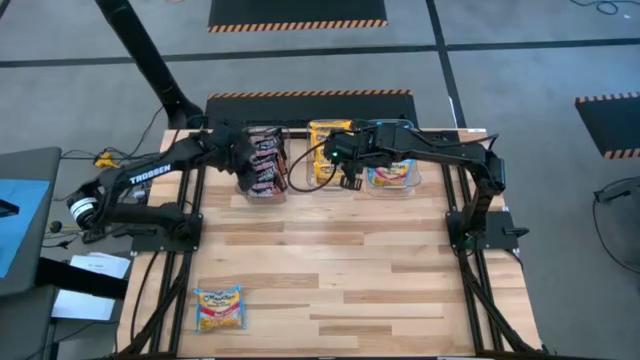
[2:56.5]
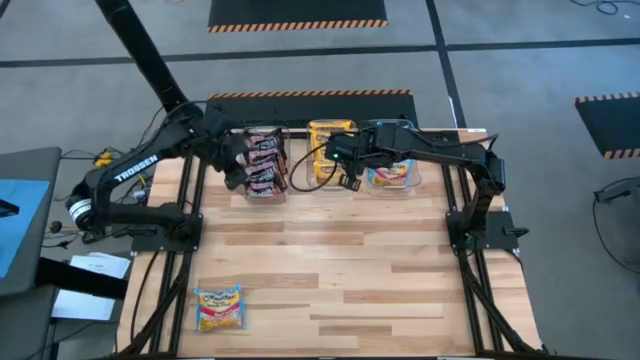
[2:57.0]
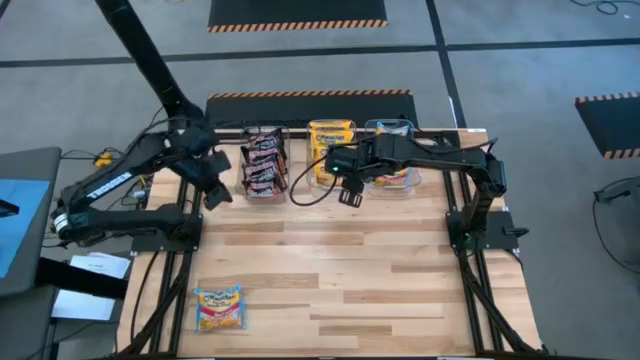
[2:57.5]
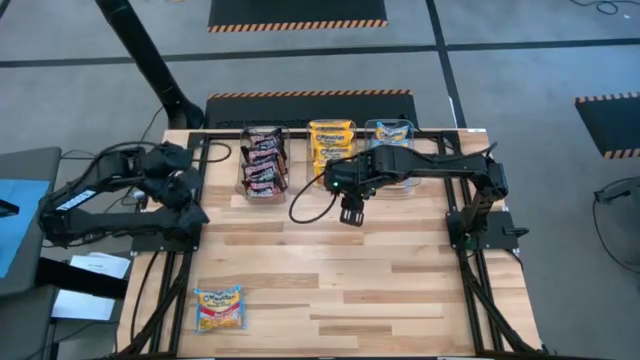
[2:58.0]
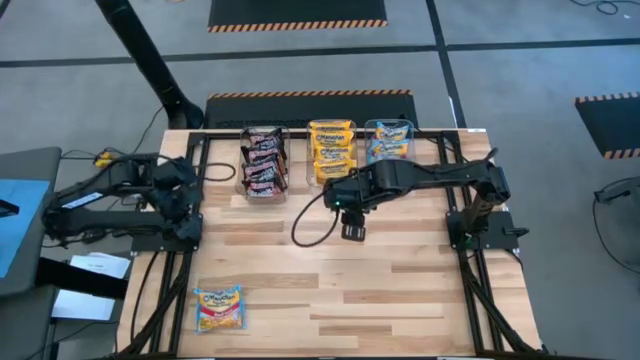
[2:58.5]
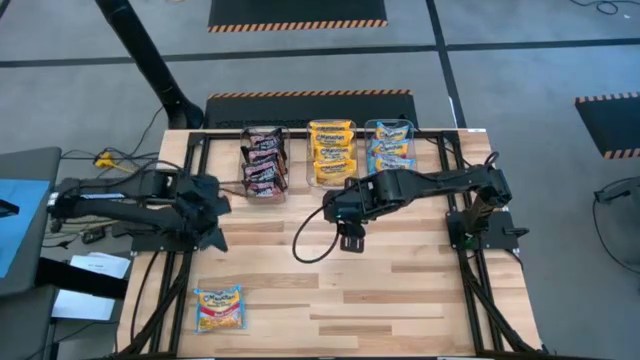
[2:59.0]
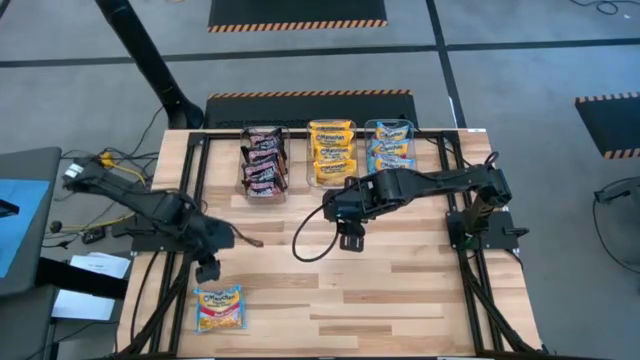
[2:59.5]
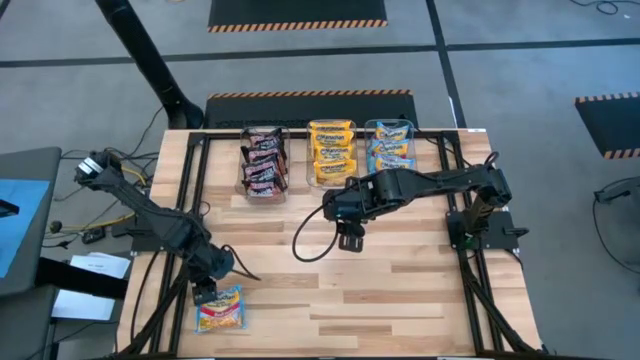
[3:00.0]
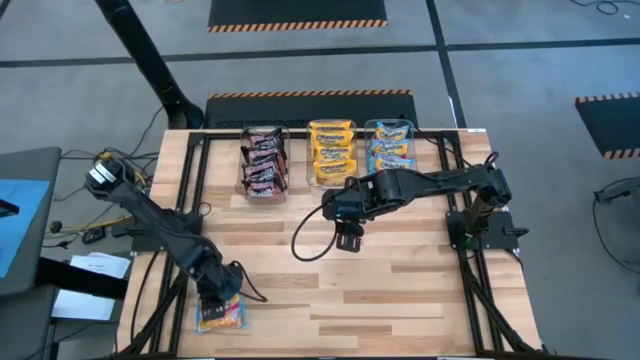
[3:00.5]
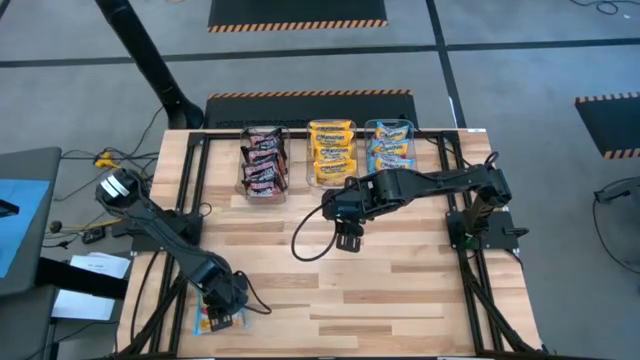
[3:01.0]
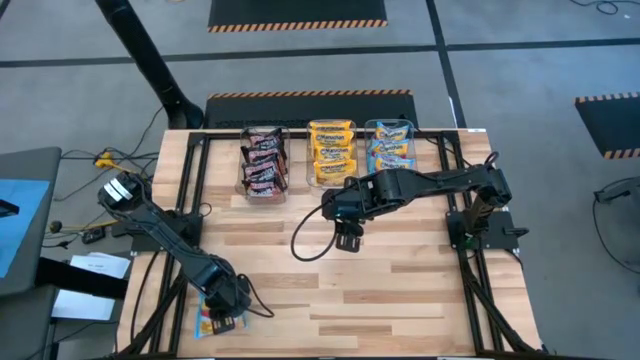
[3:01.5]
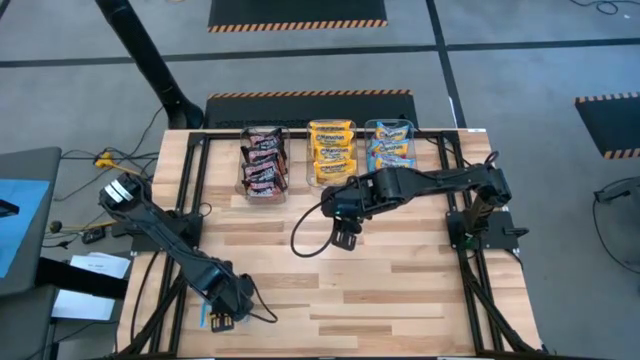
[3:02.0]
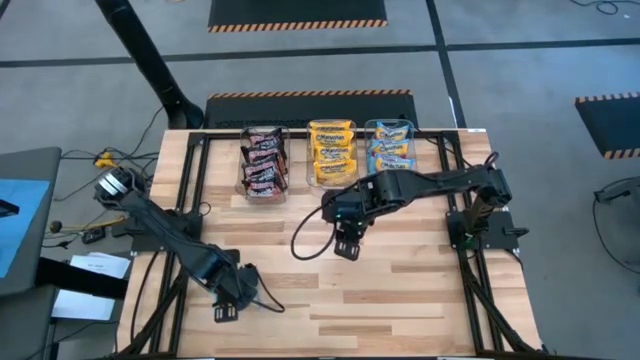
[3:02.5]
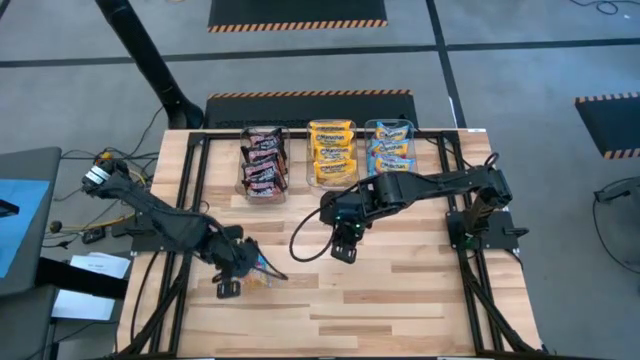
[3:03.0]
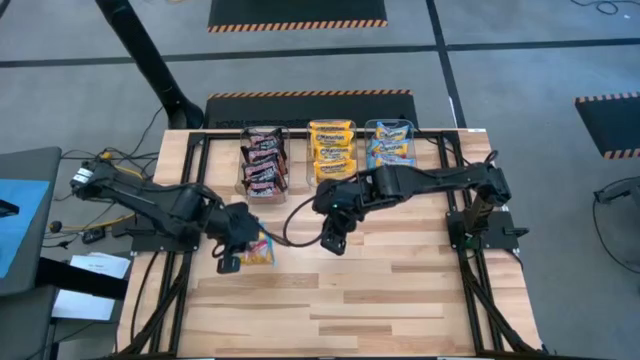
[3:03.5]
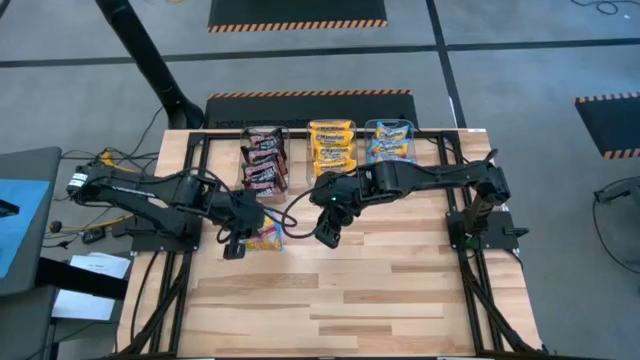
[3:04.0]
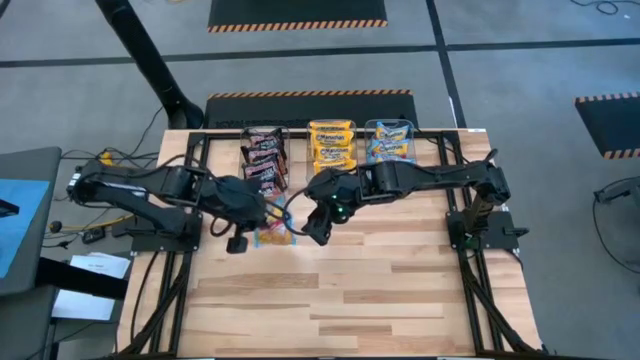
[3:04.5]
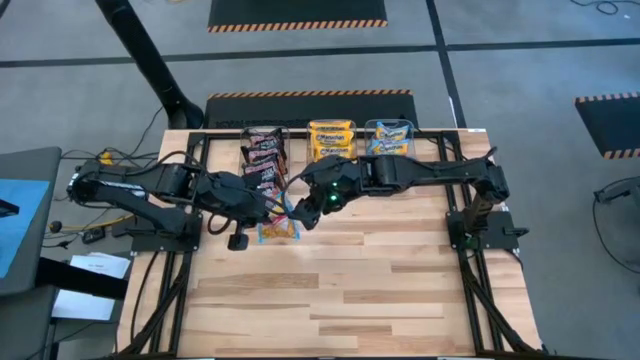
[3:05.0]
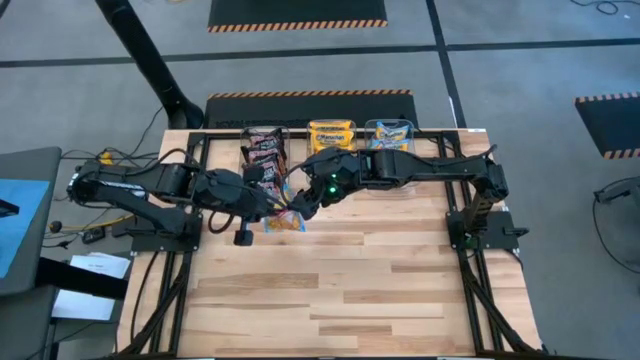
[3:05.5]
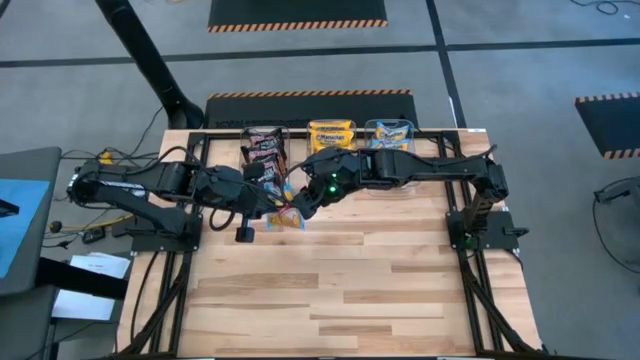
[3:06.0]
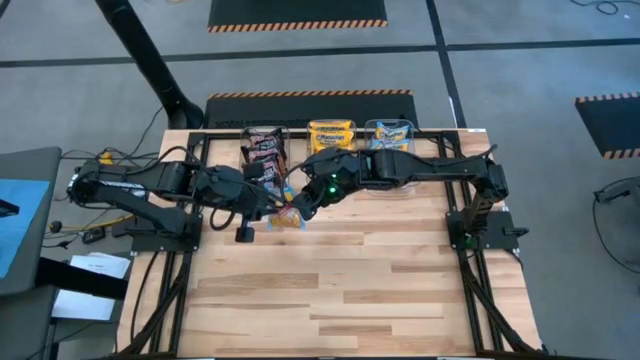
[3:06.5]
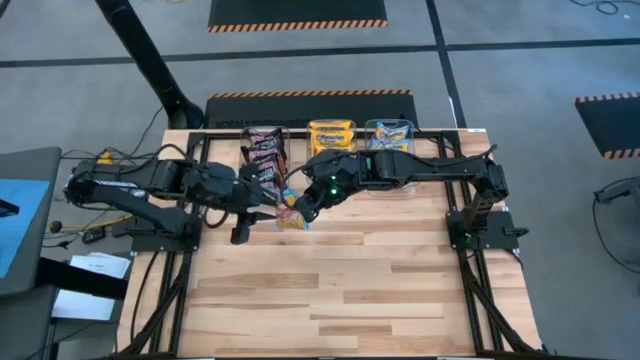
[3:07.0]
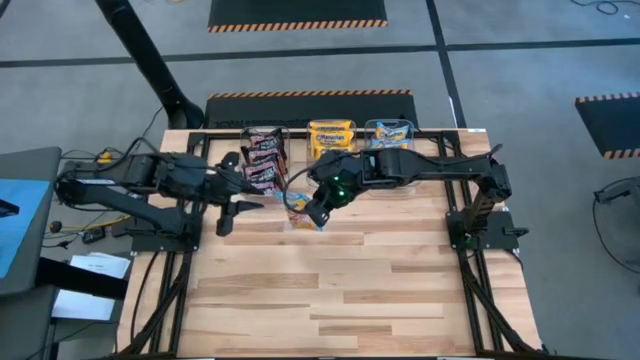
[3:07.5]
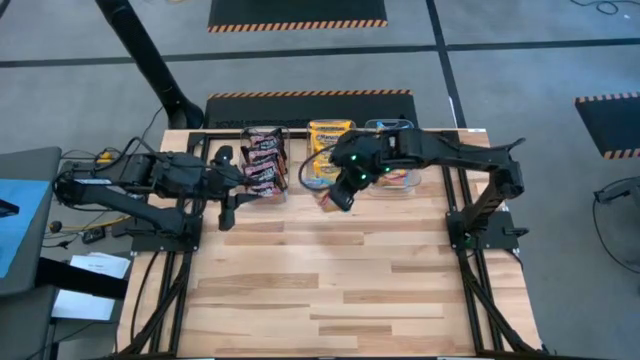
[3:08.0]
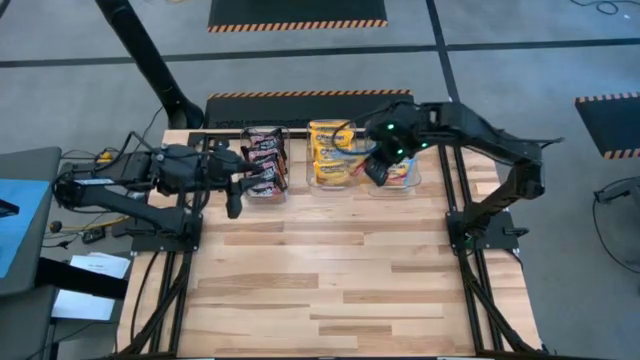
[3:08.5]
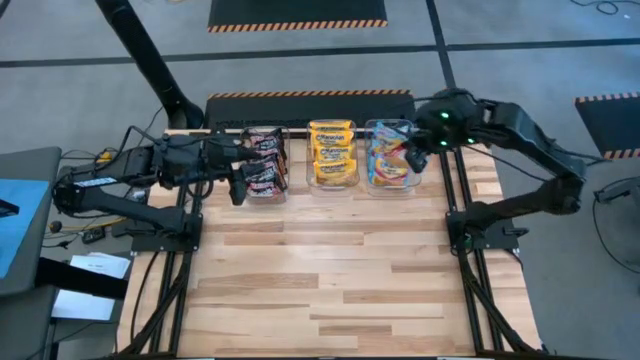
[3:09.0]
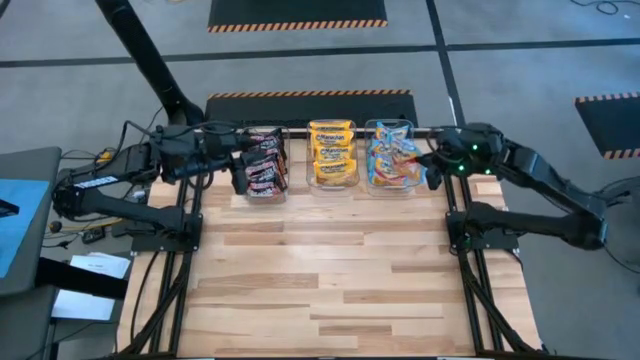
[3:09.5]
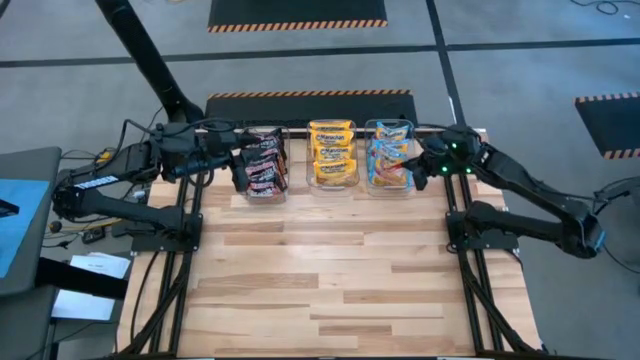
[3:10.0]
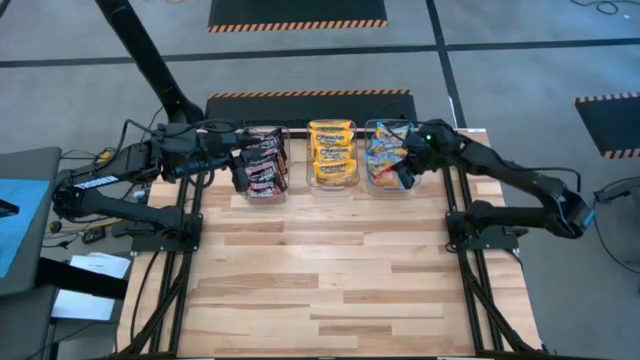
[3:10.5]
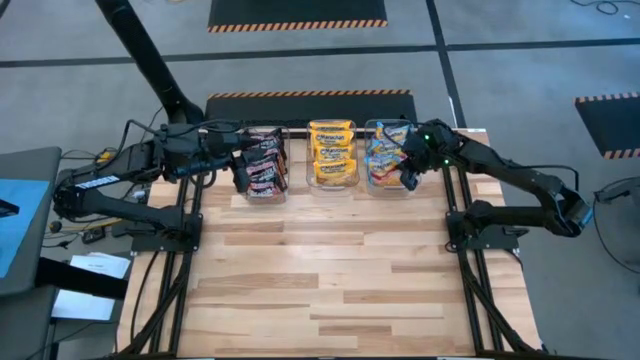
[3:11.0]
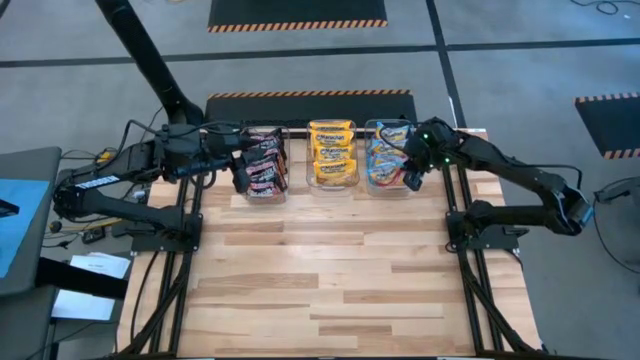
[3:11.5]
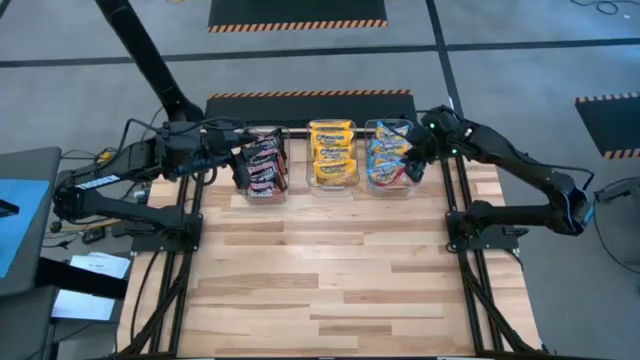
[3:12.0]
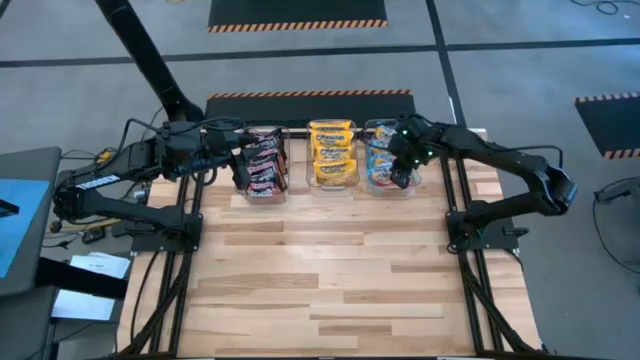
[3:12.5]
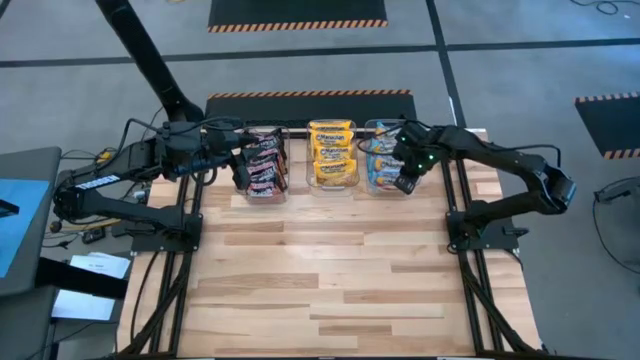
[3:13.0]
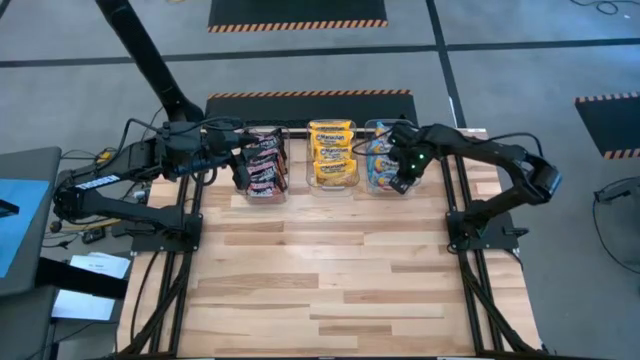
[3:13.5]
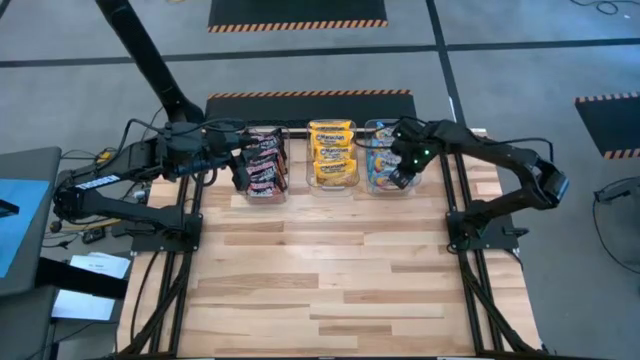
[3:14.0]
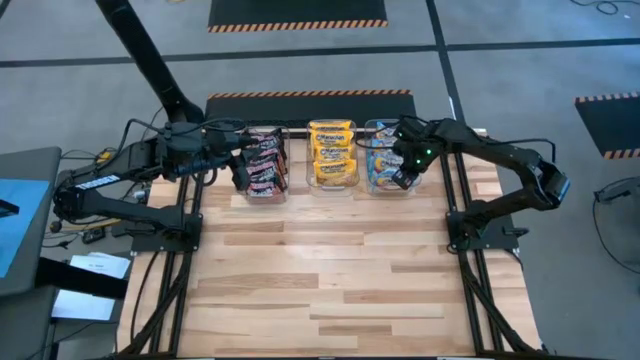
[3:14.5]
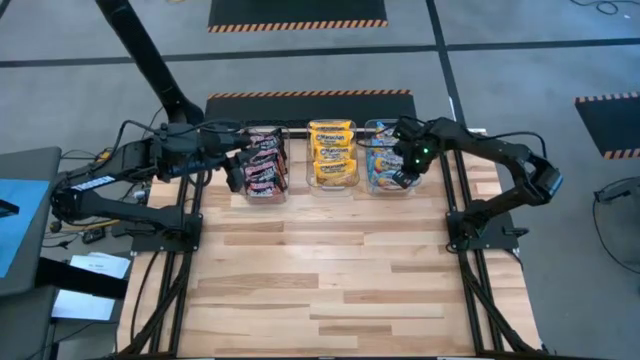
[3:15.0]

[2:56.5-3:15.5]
Task: Sort Maruchan noodles
Put the blue noodle pack into the right transparent bin

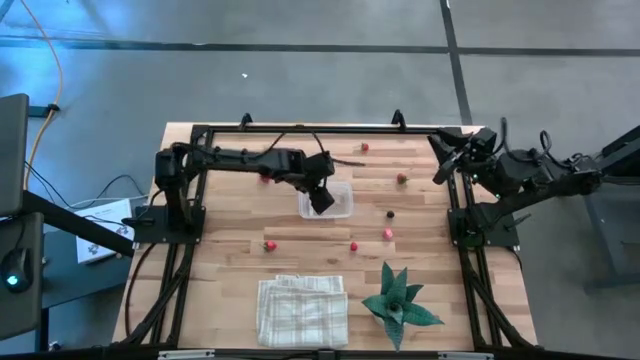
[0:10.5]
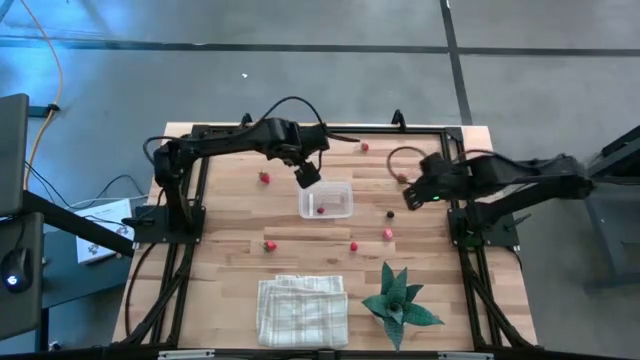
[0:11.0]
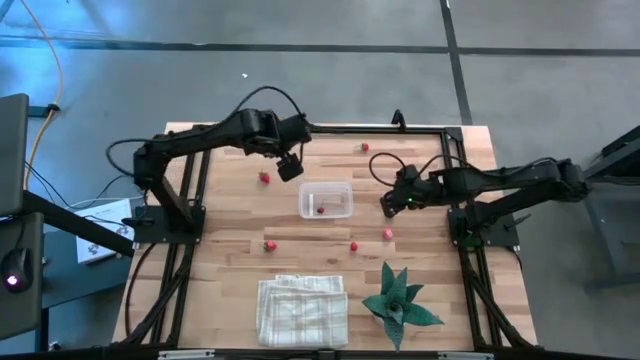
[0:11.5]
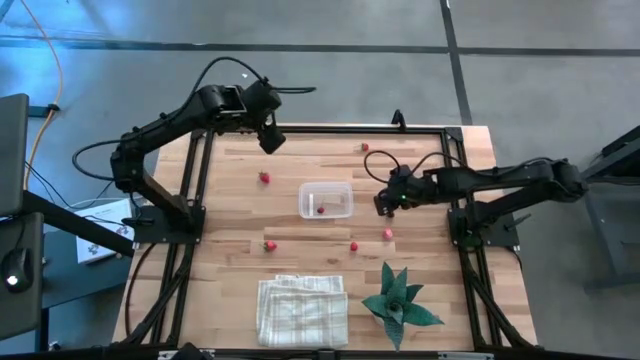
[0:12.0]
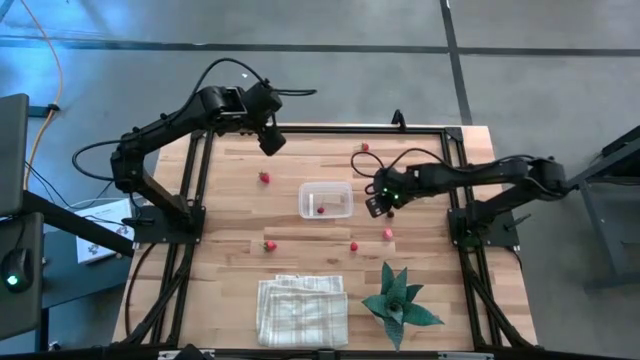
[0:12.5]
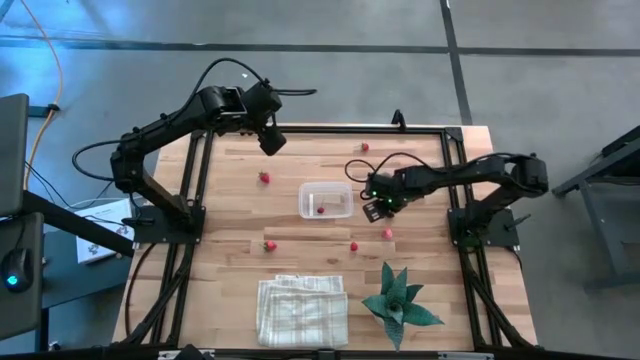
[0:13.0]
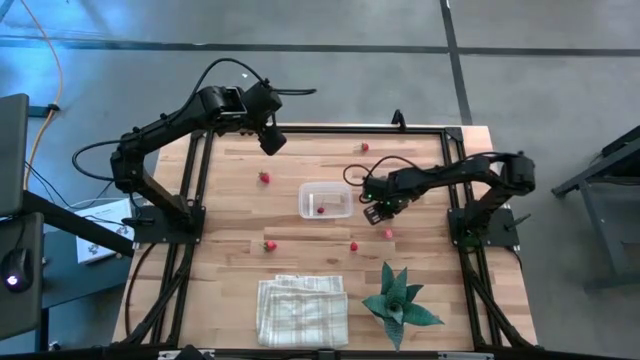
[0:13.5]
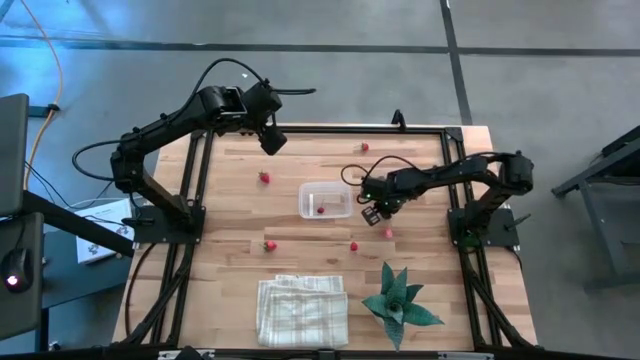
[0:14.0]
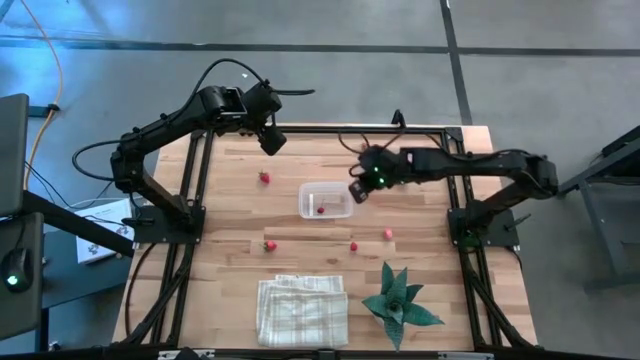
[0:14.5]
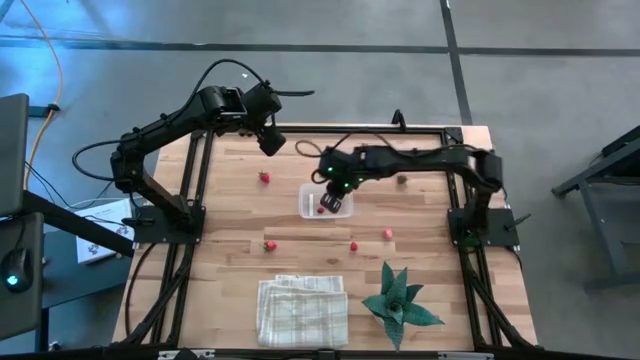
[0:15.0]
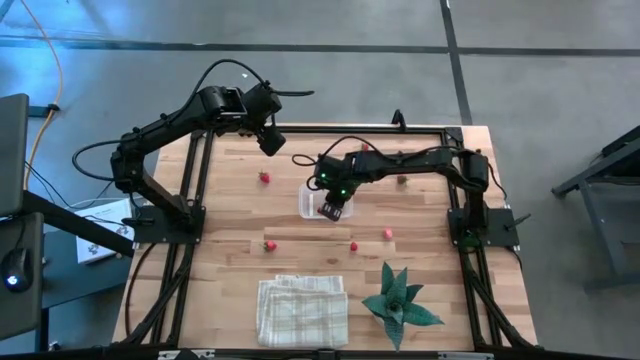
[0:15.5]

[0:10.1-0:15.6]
Task: Pick and placing Produce into tupperware
Put the black cherry into the transparent bin
